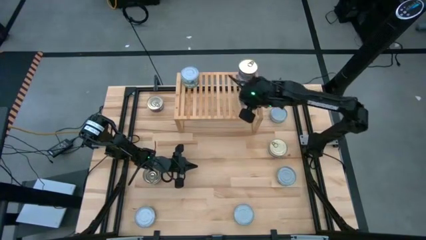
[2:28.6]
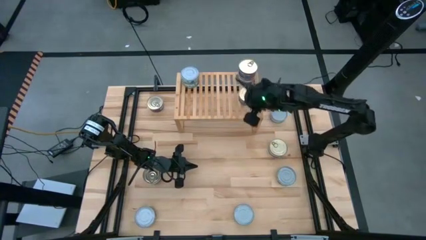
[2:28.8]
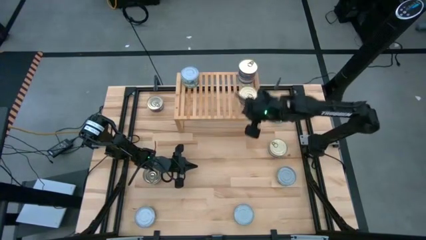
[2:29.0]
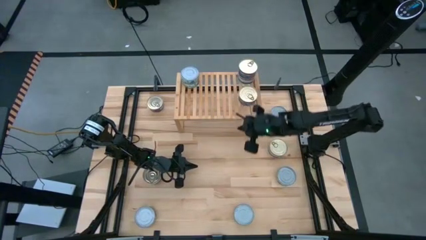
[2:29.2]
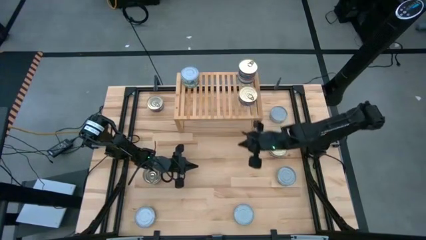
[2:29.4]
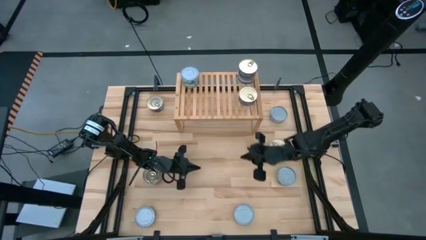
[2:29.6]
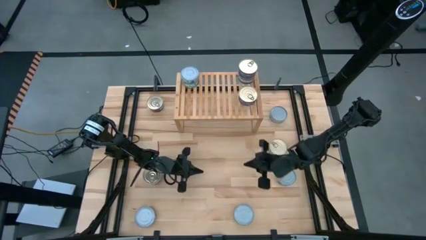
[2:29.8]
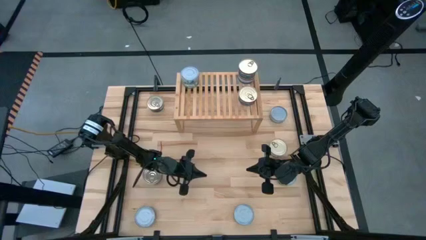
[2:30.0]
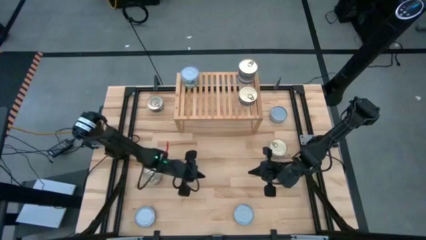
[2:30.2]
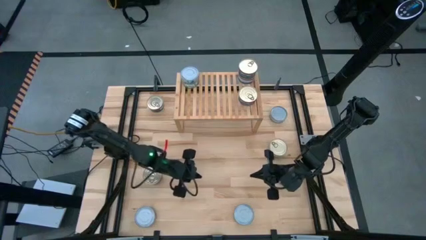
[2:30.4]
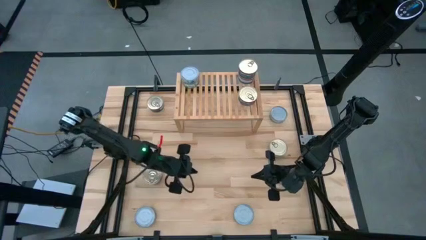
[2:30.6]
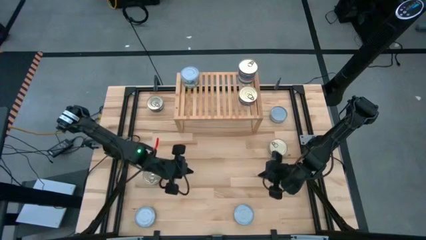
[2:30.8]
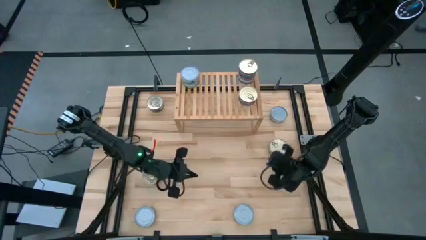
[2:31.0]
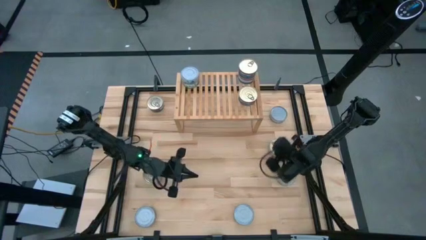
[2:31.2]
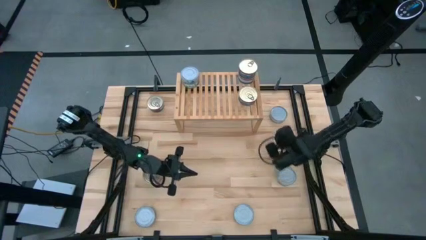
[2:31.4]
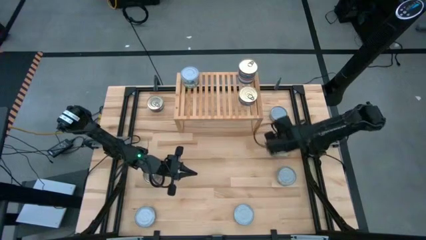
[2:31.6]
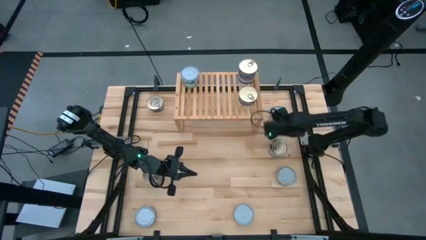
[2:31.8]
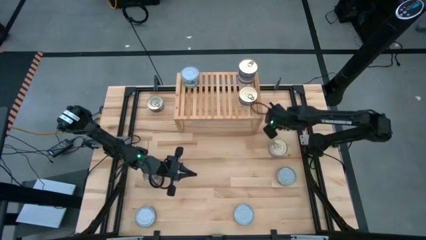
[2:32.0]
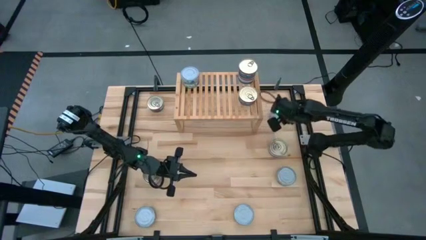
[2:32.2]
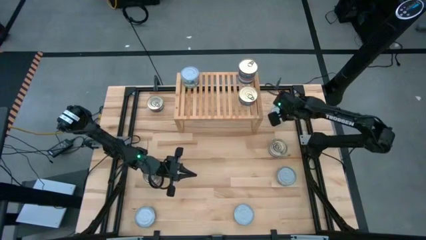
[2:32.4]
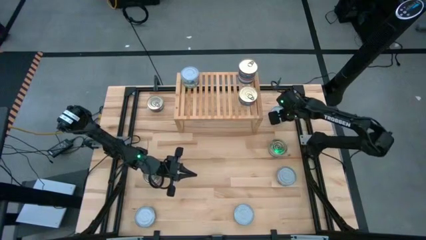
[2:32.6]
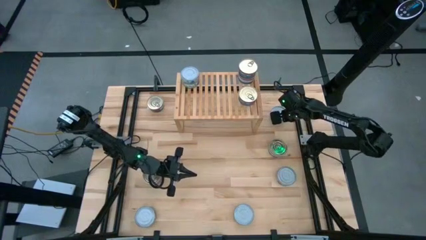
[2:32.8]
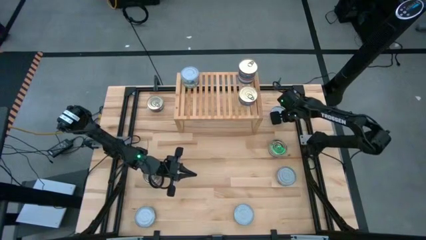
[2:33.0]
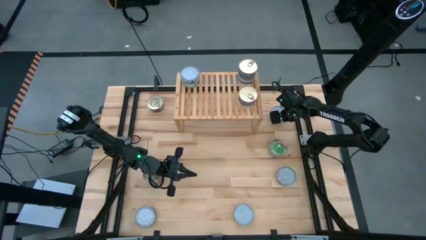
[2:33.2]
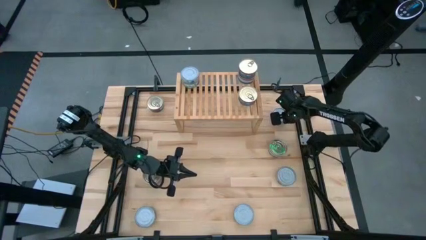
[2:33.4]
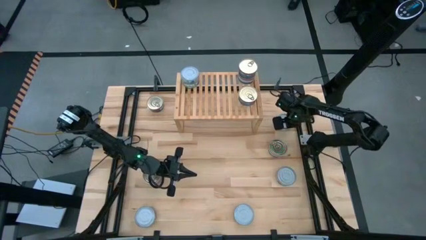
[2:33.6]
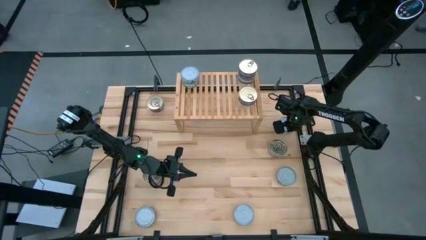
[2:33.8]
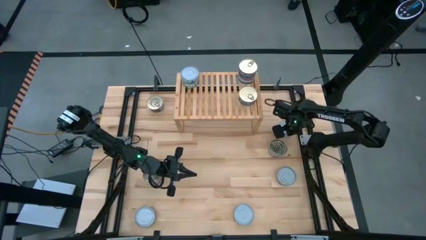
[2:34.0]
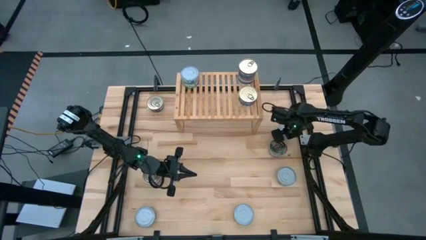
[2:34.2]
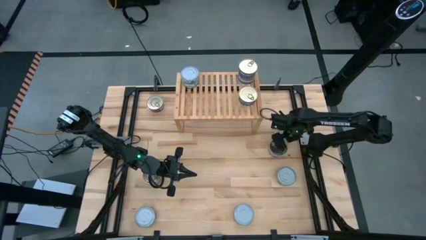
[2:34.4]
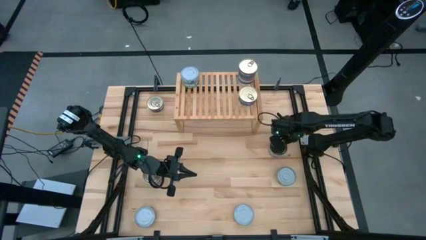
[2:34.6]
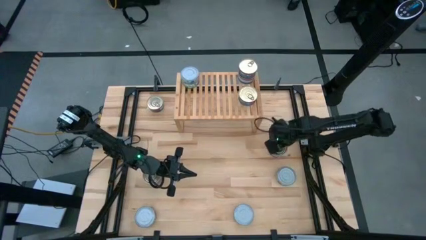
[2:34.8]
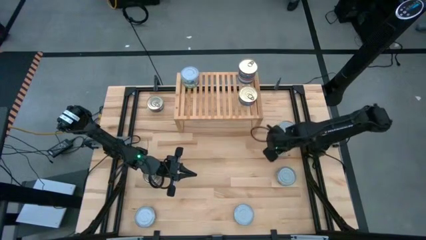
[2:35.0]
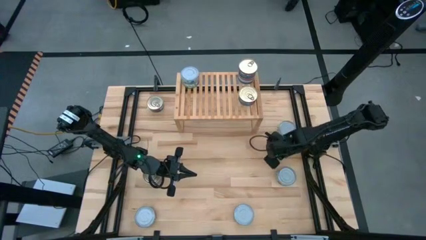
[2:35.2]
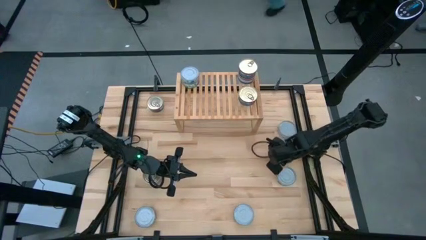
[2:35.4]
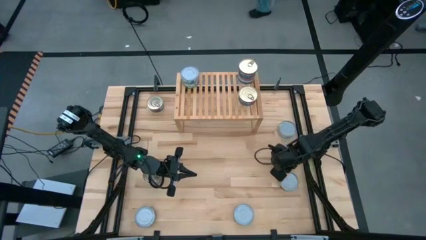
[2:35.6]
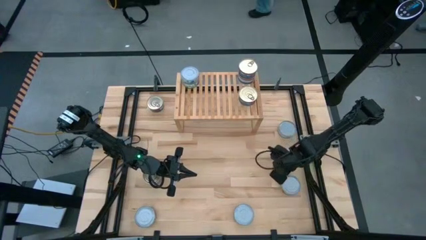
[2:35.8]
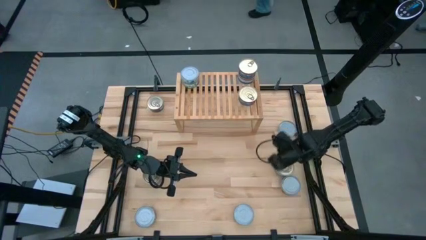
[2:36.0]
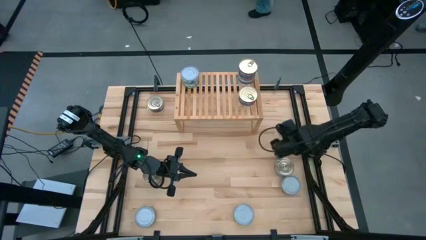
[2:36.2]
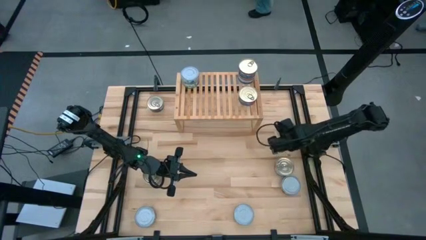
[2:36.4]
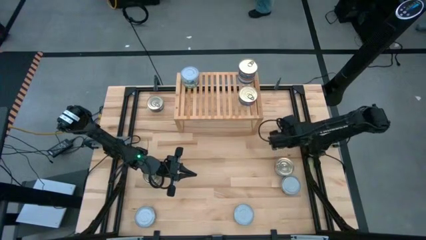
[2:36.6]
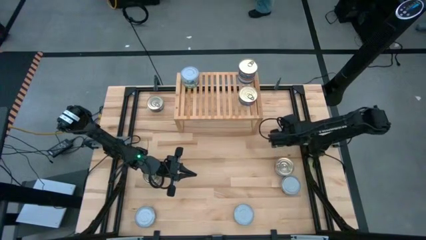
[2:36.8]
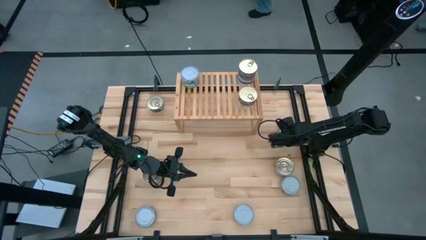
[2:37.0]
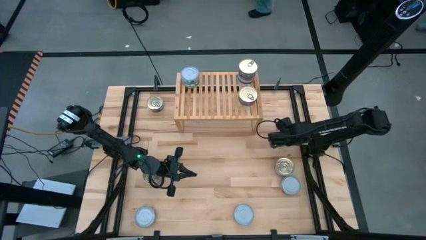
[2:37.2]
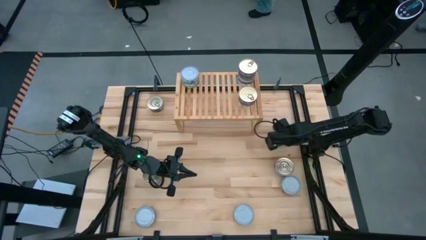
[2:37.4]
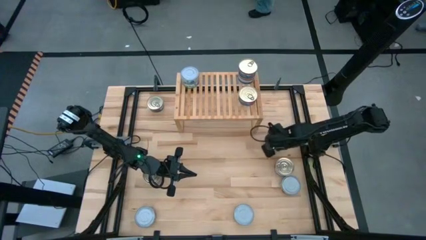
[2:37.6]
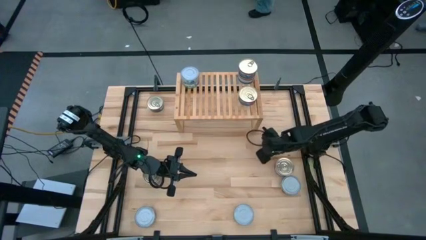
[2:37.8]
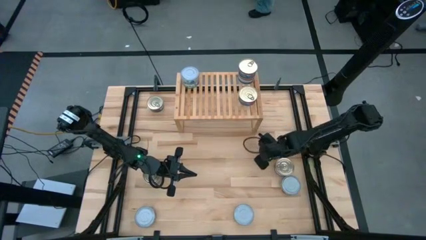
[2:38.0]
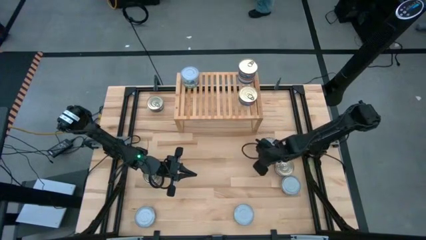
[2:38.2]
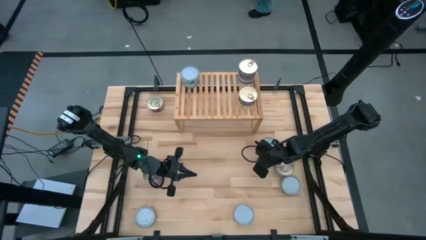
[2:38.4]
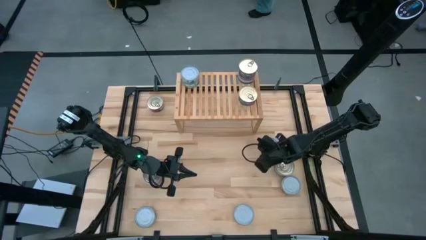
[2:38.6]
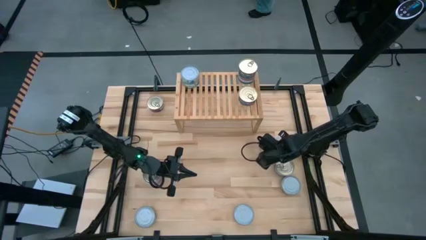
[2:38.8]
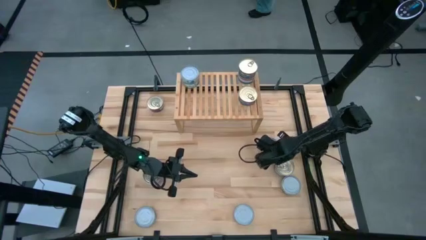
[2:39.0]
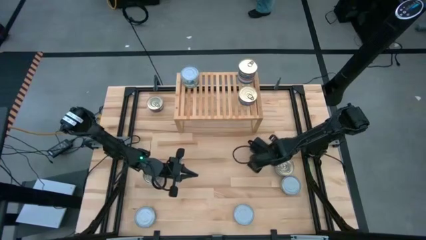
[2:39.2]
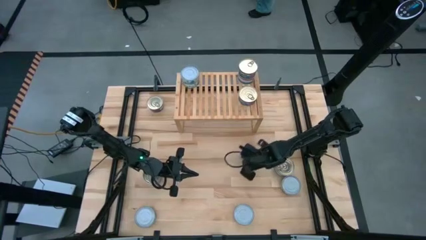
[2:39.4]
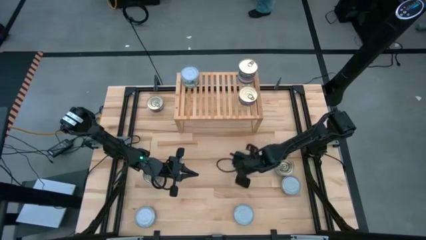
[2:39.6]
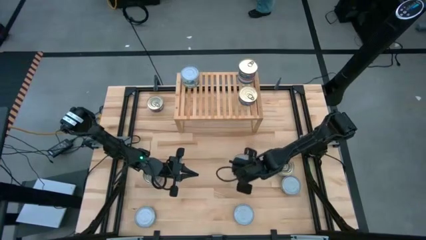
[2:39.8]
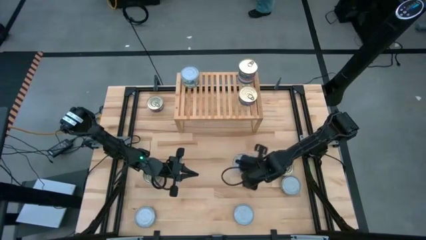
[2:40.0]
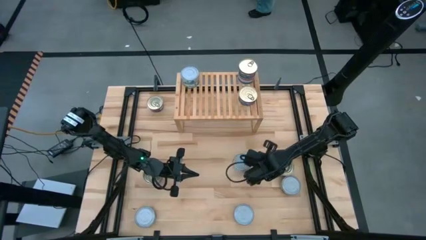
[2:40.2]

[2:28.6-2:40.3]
Task: Stack canned seafood by type on shelf
Put the green tuna can on the shelf

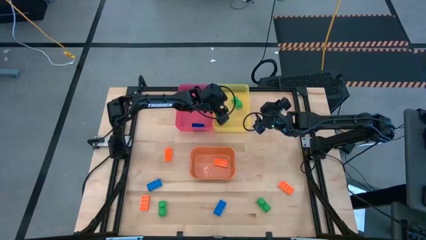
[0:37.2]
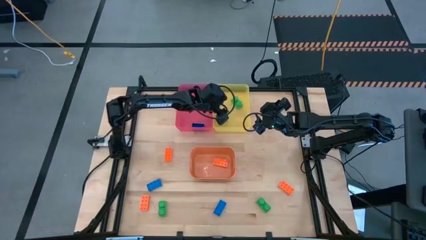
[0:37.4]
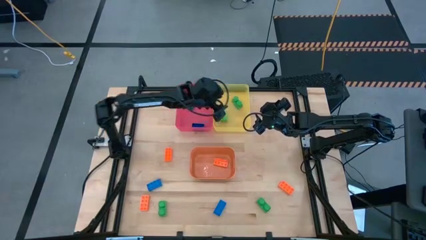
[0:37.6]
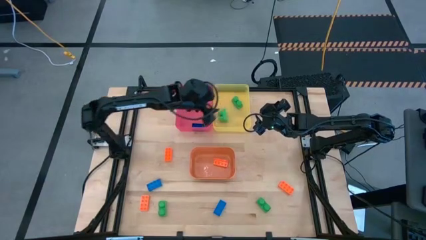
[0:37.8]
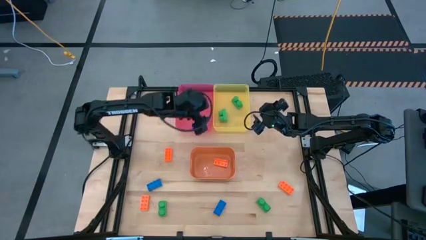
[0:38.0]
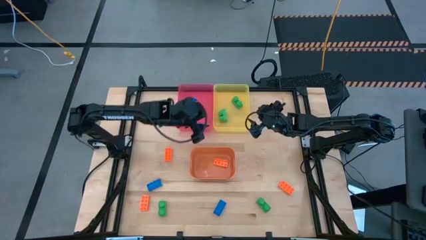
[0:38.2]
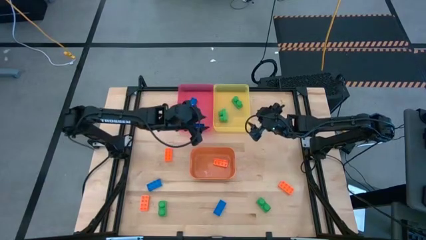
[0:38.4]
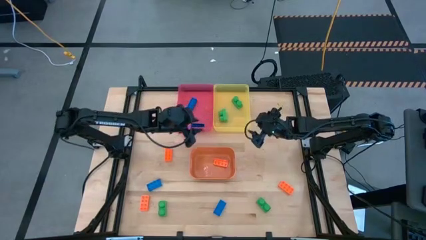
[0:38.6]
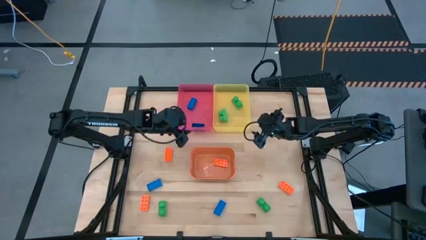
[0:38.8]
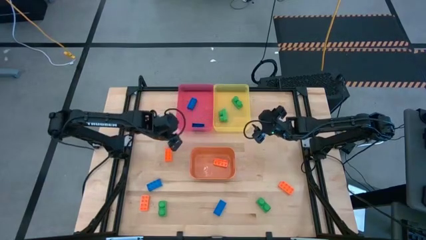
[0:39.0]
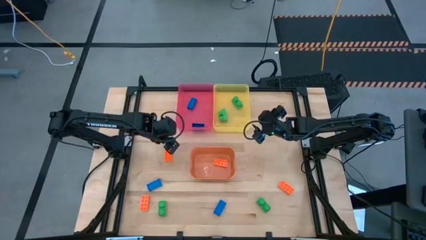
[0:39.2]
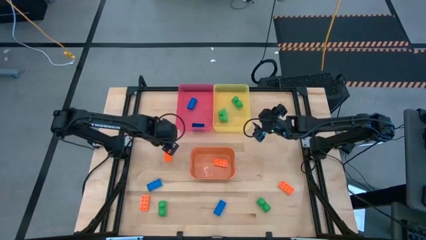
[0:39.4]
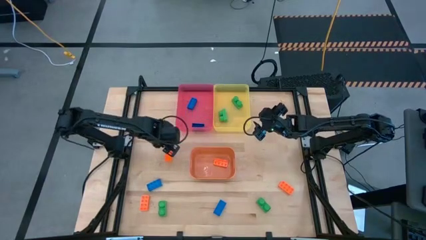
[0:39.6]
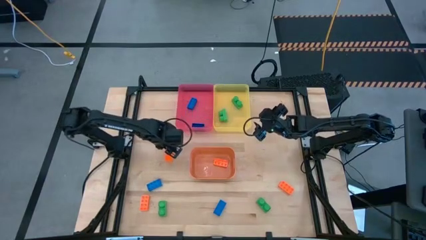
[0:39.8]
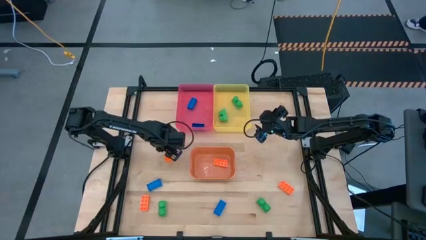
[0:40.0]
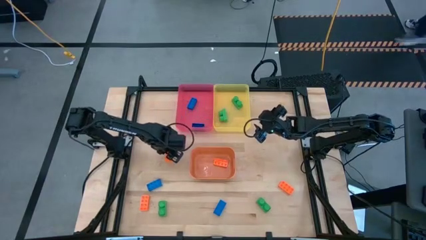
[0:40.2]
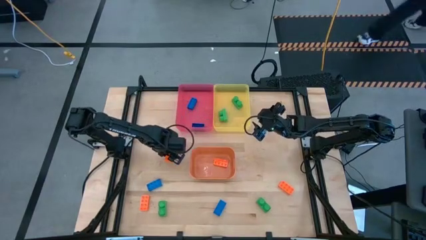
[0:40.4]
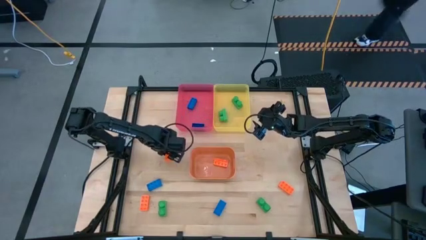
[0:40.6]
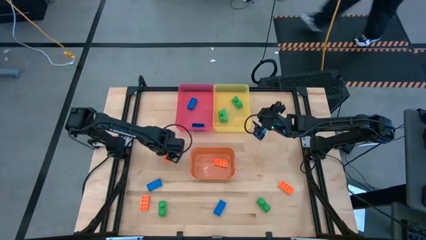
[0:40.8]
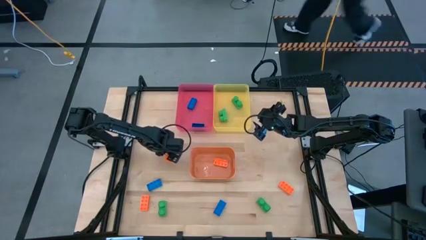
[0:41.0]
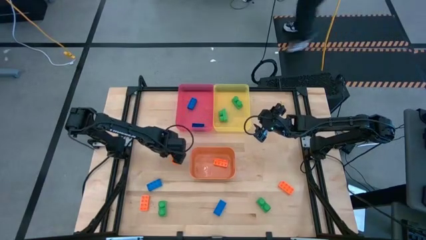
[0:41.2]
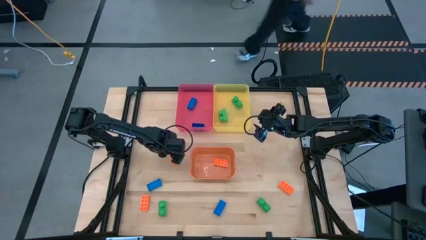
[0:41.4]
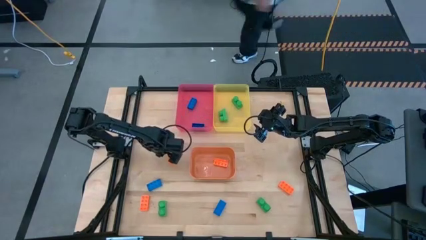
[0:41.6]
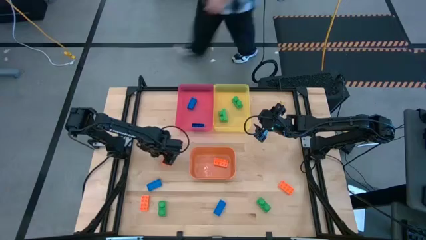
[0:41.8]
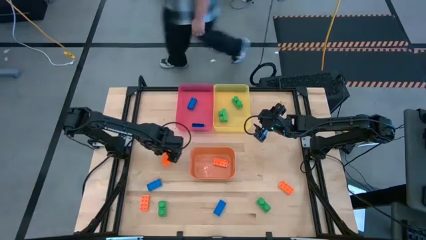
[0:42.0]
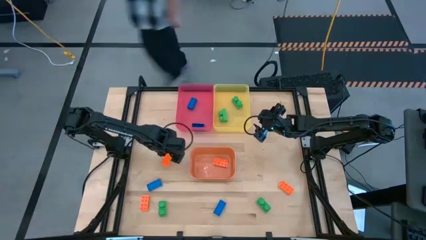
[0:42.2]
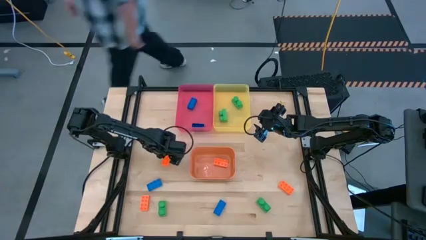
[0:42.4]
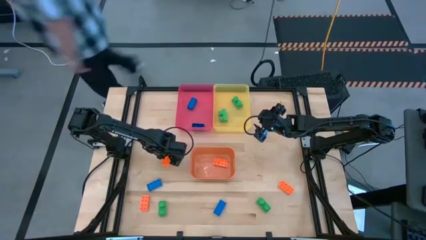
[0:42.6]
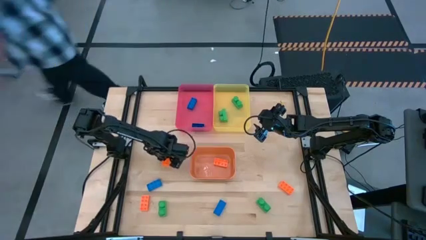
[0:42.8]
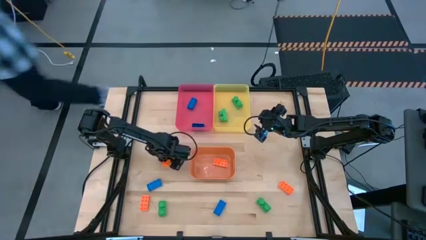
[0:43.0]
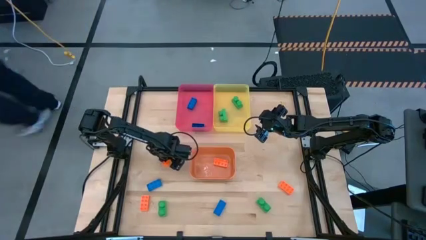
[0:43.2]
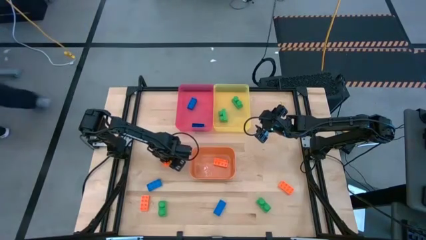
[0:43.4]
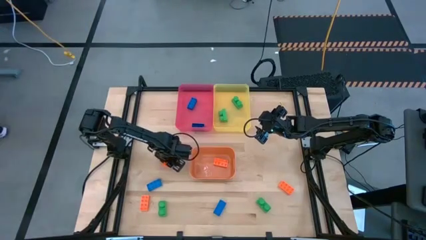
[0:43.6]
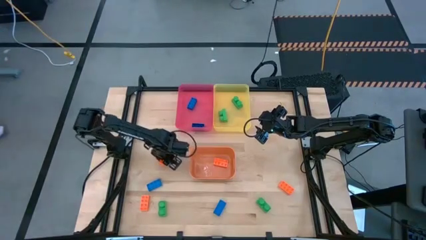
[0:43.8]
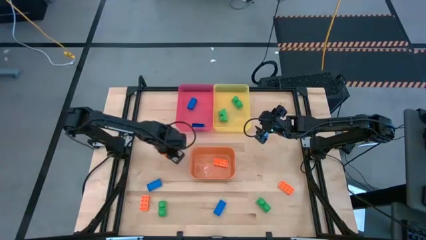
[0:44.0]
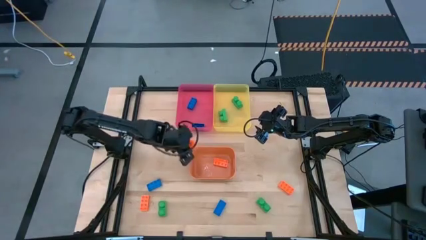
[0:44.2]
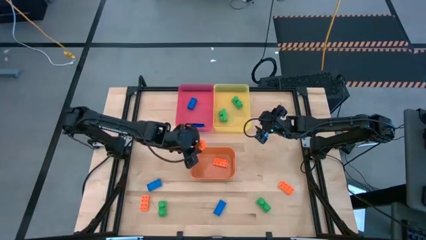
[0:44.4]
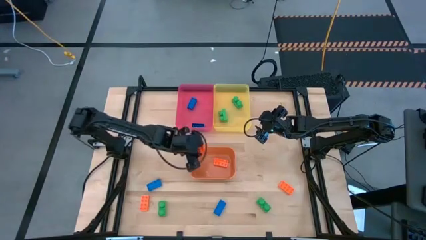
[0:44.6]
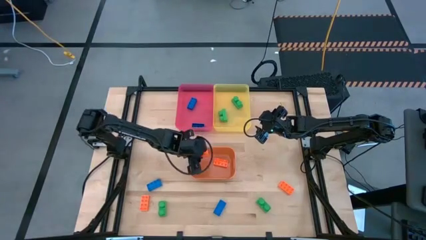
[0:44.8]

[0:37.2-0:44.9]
Task: Sort & place blocks by color
Put the orange game piece into the orange bin
